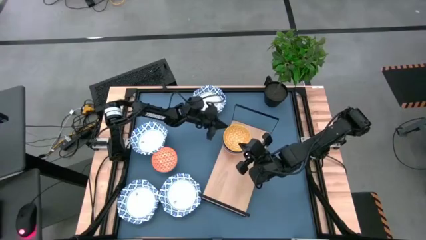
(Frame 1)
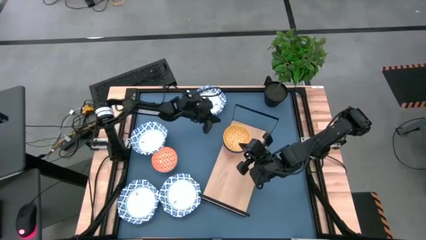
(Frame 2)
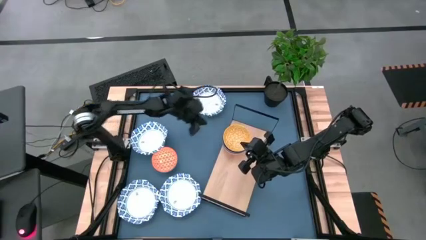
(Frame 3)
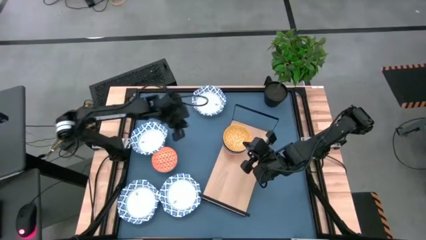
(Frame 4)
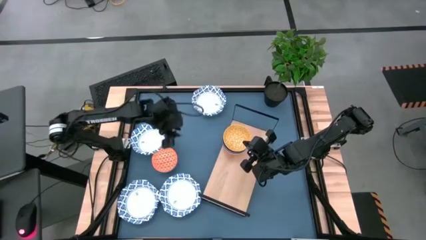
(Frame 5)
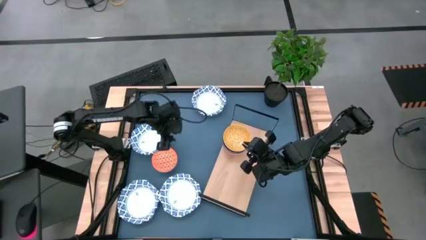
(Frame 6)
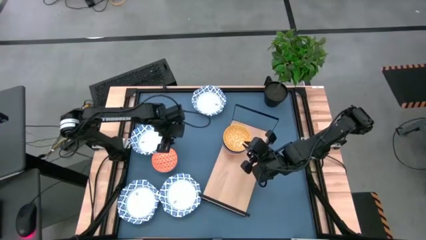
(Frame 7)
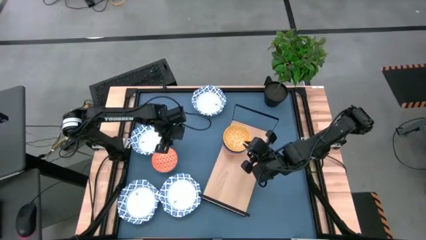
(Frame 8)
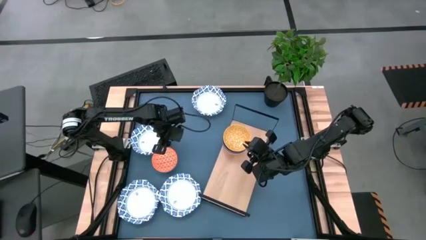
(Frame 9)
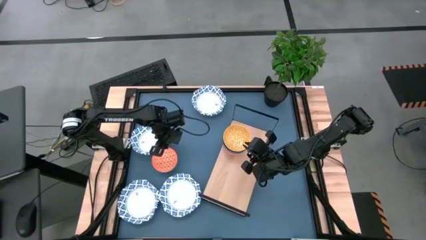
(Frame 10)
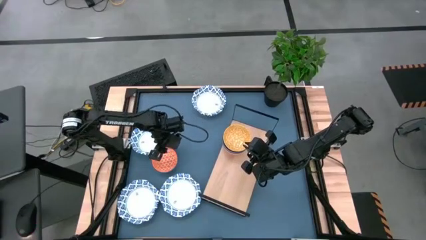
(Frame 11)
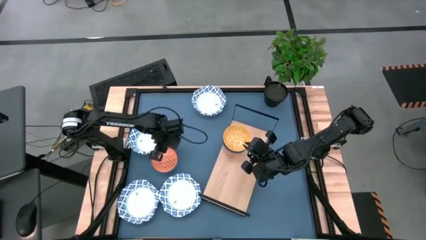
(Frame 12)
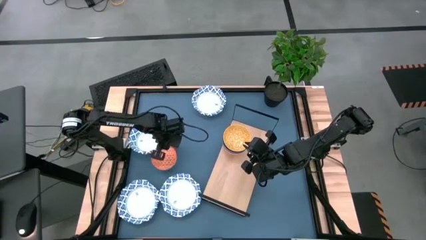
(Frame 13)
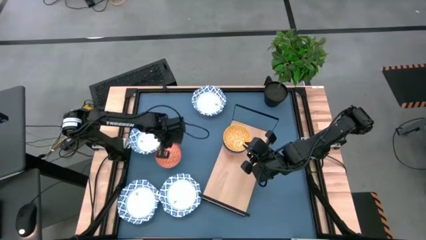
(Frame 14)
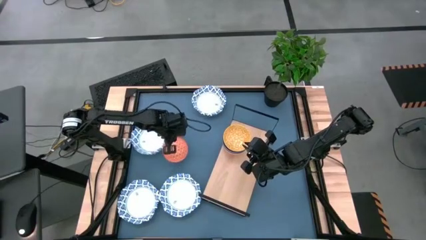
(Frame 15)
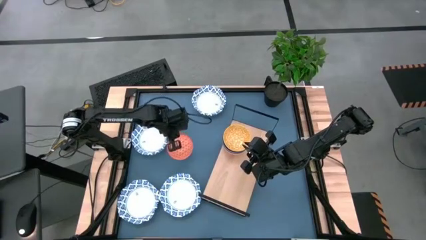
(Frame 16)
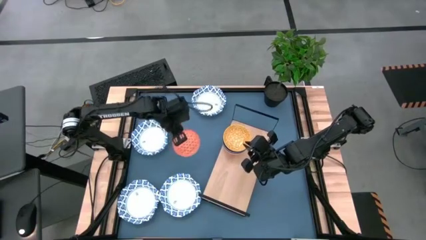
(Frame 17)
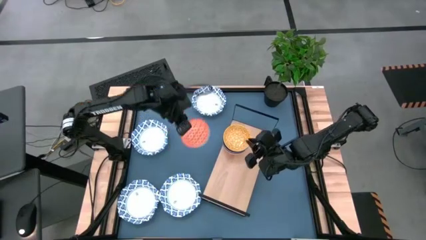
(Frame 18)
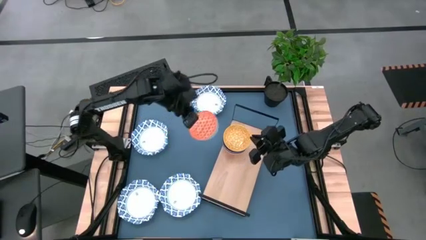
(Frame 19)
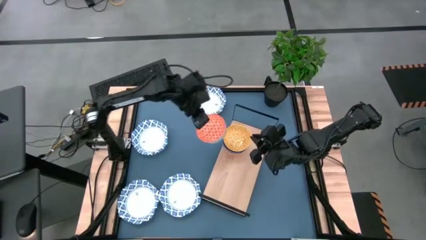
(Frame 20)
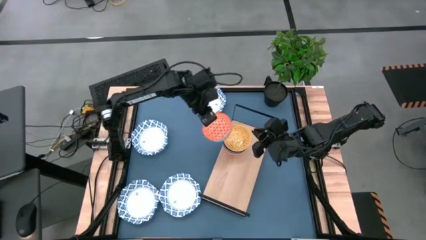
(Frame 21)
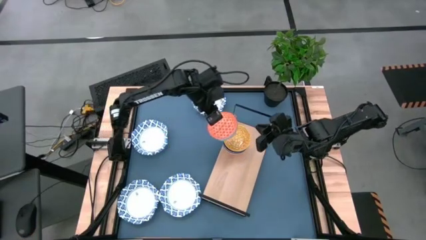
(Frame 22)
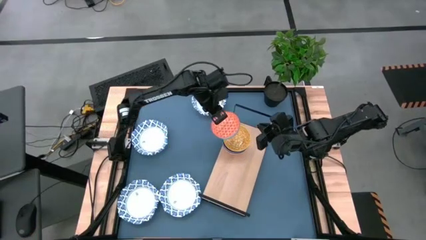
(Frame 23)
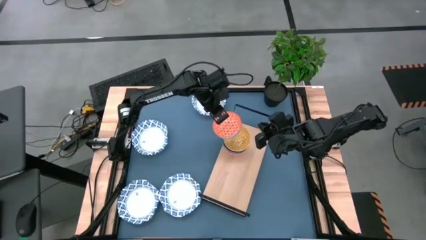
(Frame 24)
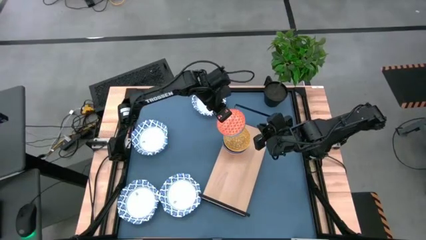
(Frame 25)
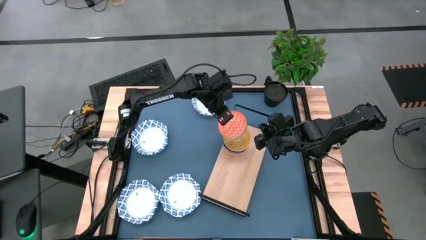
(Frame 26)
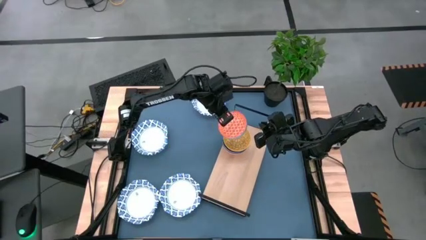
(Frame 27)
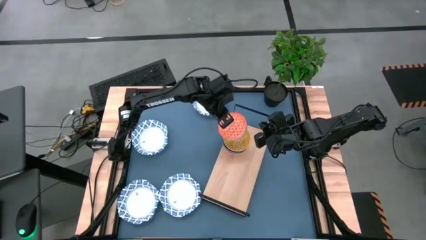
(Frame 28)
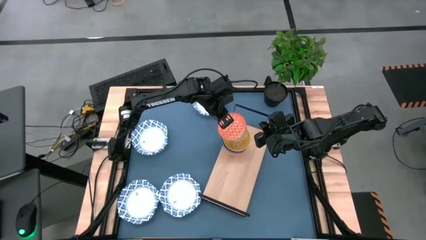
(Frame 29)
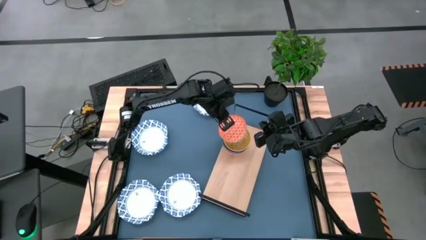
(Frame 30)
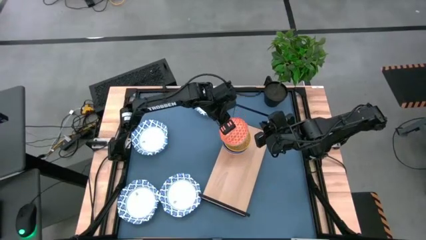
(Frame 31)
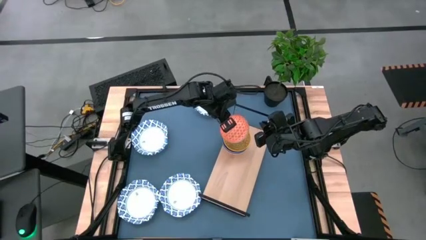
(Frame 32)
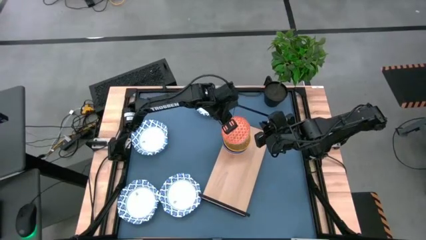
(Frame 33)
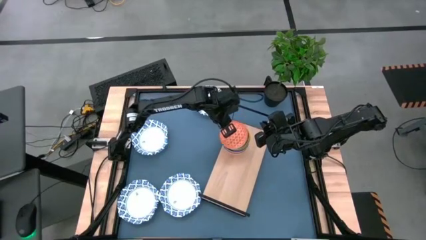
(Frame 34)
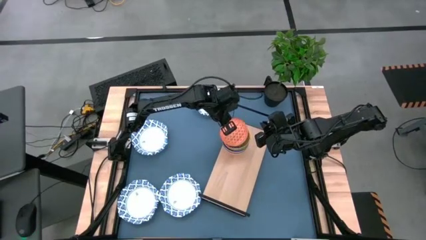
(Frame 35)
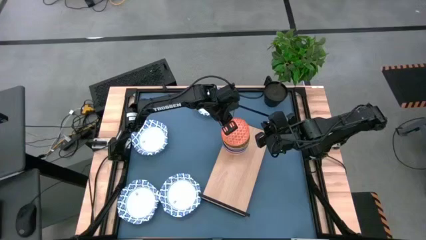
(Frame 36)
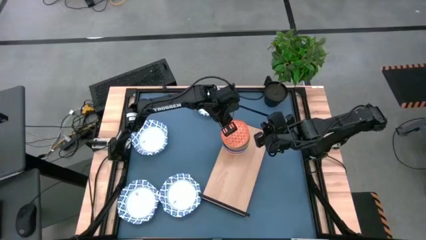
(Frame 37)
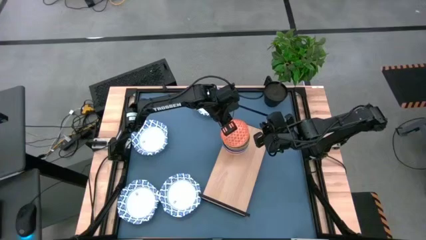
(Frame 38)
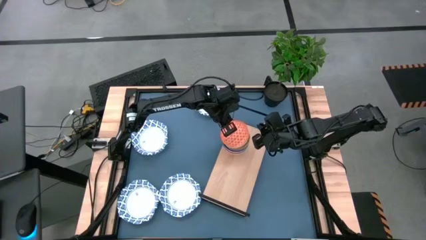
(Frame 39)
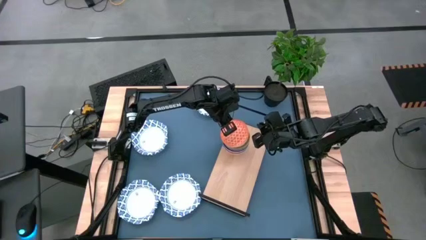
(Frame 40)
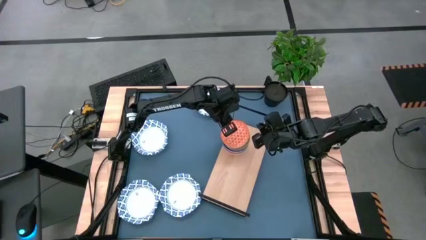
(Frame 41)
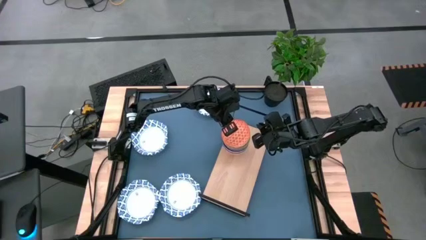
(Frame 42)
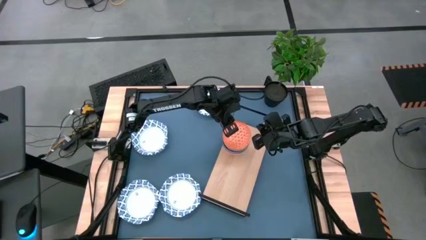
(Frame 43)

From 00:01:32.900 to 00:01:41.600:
Task: Place and stack bowls onto a shelf
Stack the orange patterned bowl into the yellow patterned bowl

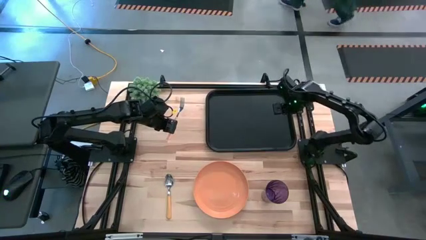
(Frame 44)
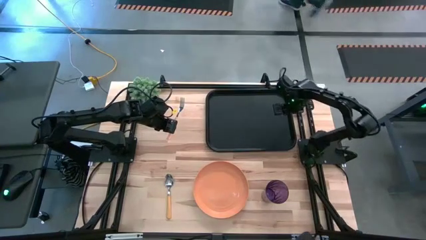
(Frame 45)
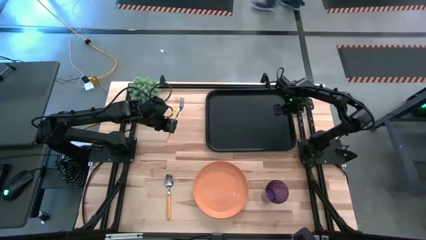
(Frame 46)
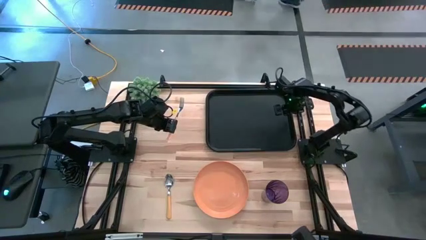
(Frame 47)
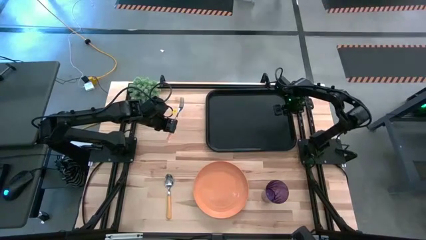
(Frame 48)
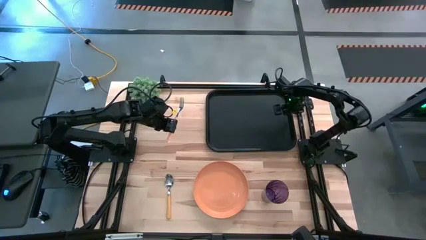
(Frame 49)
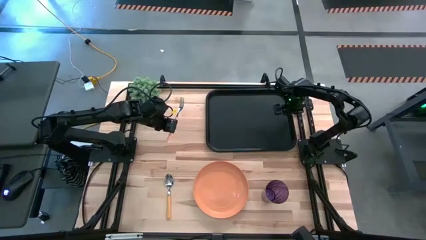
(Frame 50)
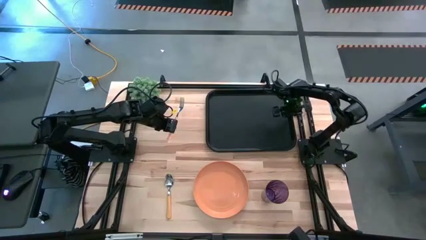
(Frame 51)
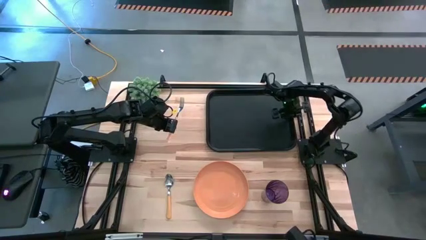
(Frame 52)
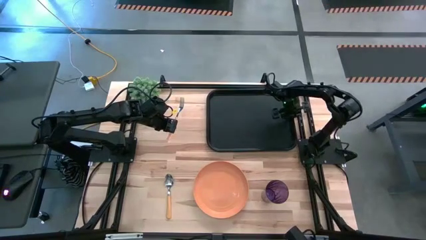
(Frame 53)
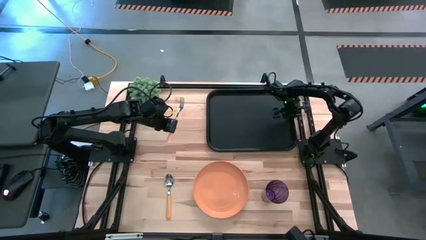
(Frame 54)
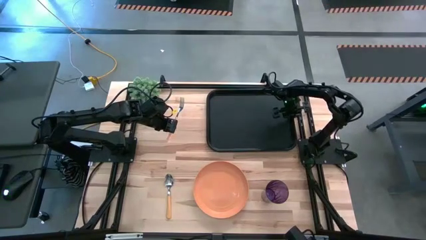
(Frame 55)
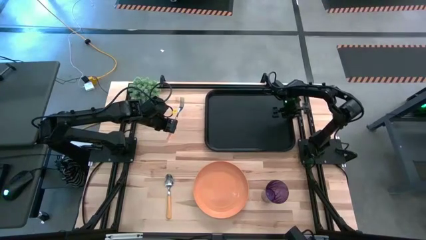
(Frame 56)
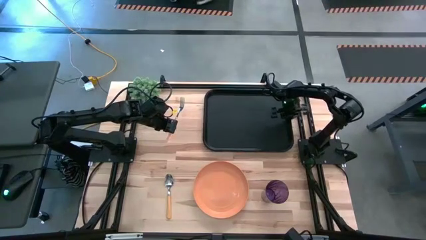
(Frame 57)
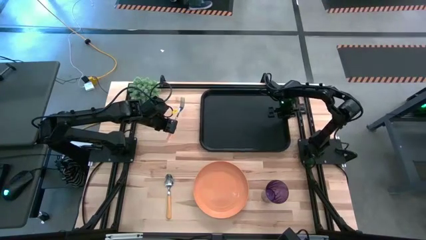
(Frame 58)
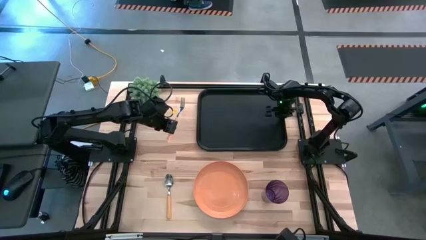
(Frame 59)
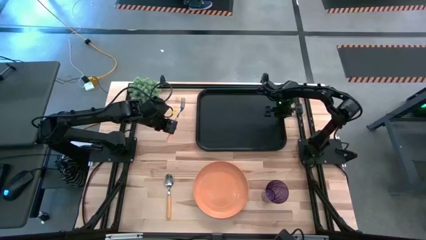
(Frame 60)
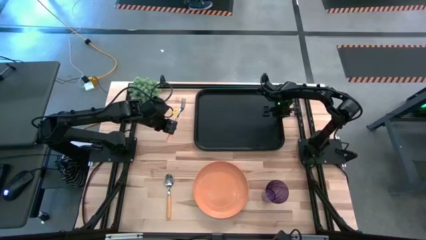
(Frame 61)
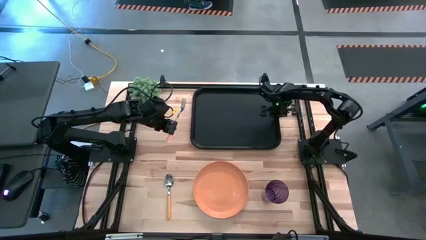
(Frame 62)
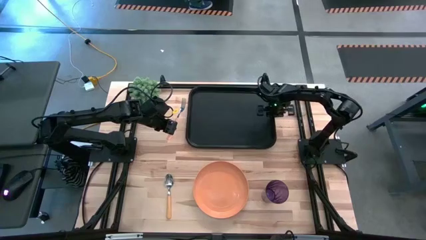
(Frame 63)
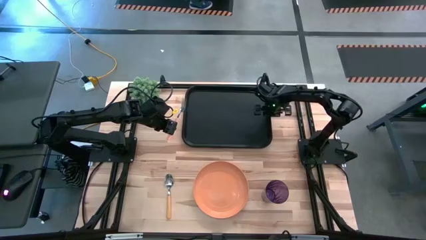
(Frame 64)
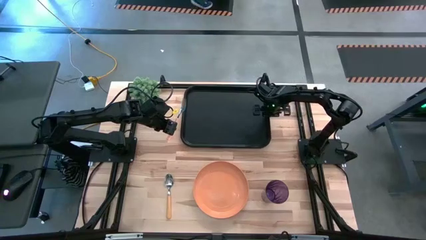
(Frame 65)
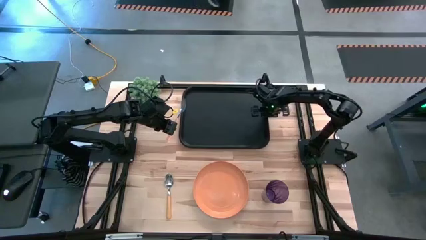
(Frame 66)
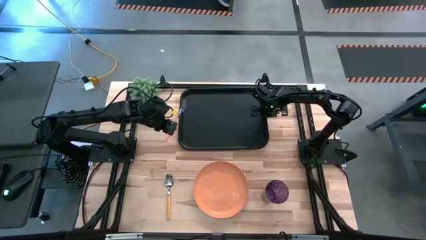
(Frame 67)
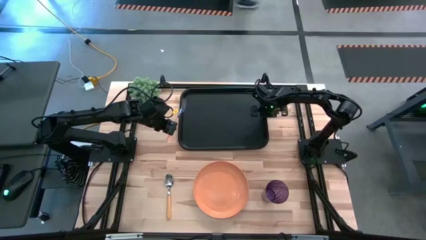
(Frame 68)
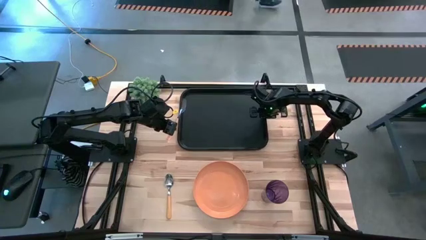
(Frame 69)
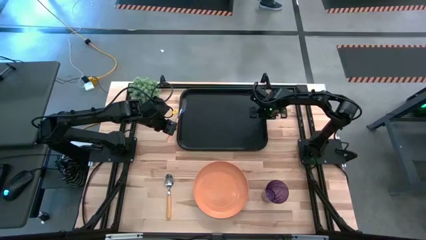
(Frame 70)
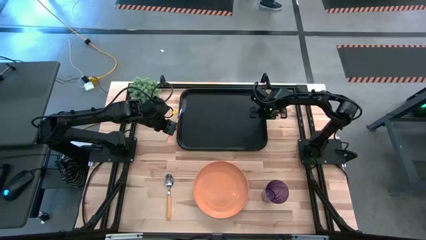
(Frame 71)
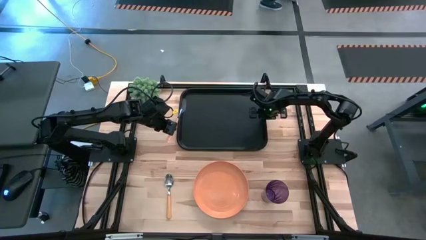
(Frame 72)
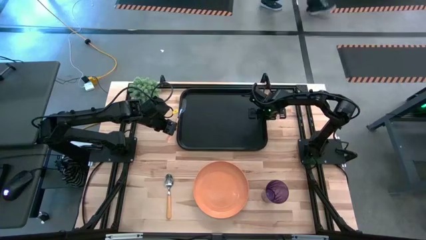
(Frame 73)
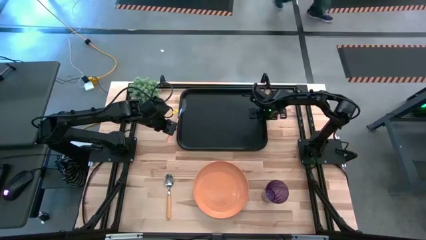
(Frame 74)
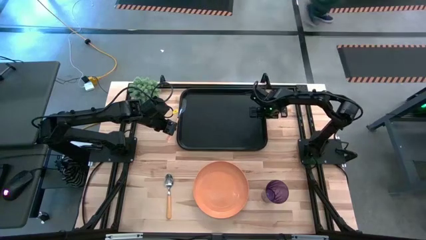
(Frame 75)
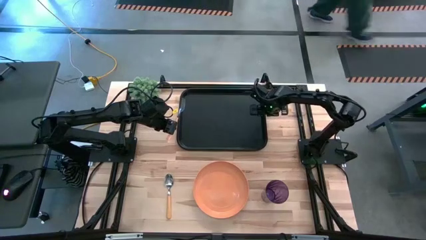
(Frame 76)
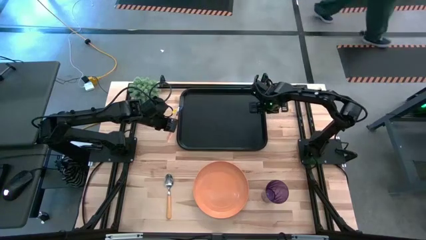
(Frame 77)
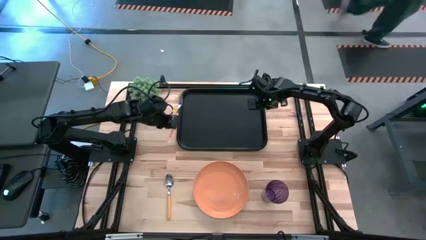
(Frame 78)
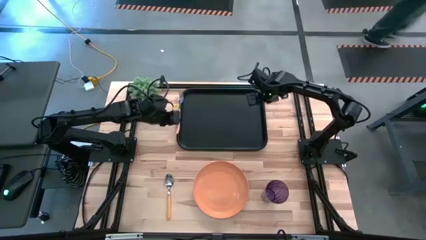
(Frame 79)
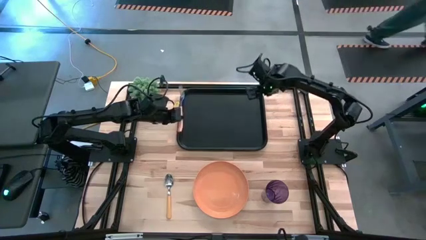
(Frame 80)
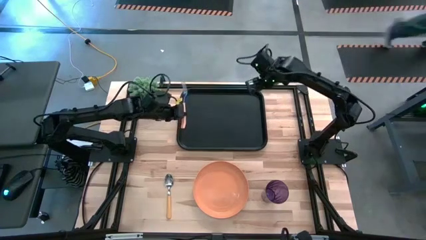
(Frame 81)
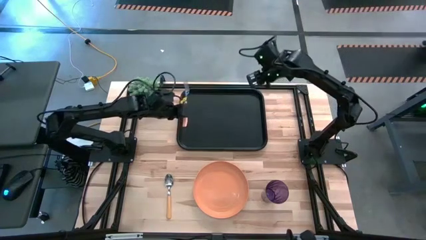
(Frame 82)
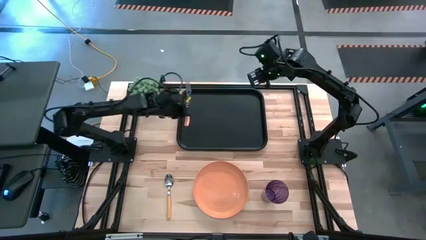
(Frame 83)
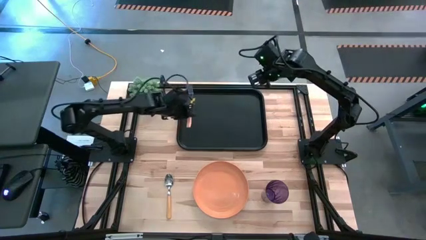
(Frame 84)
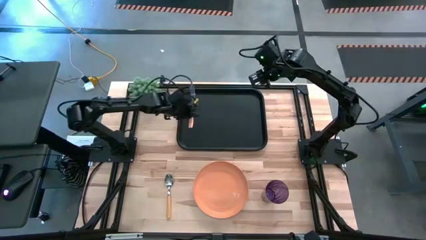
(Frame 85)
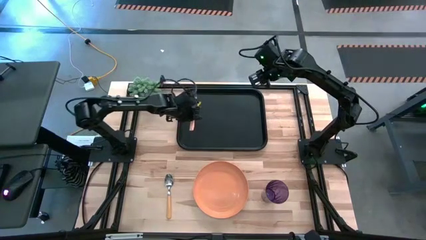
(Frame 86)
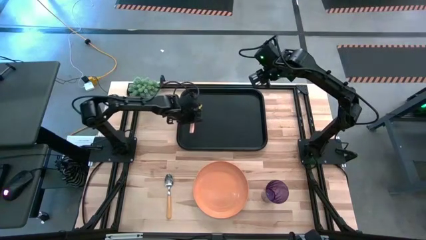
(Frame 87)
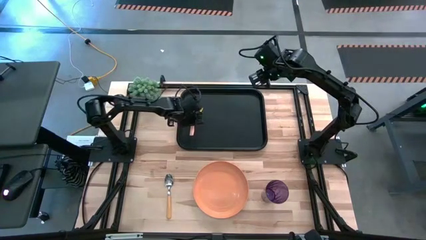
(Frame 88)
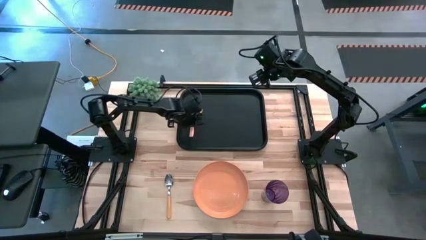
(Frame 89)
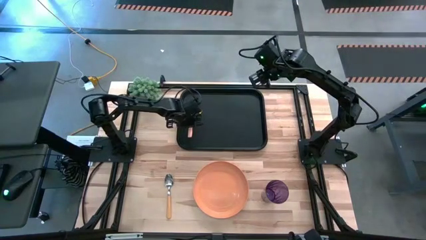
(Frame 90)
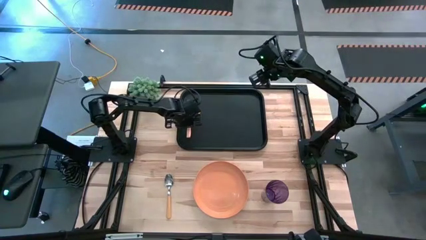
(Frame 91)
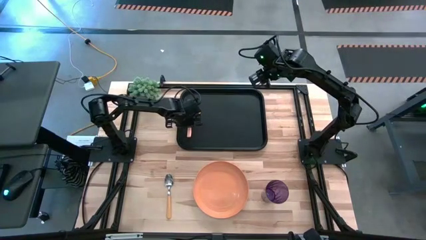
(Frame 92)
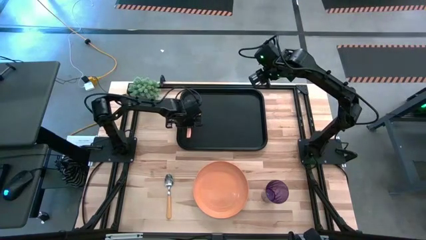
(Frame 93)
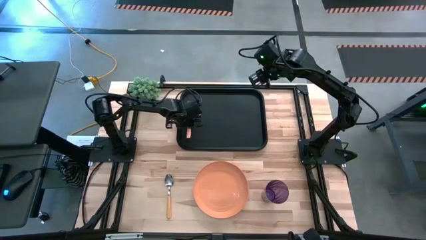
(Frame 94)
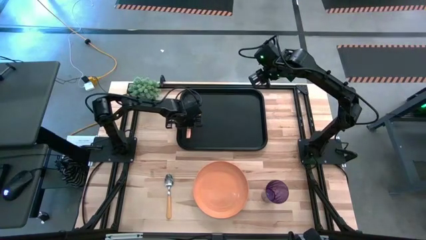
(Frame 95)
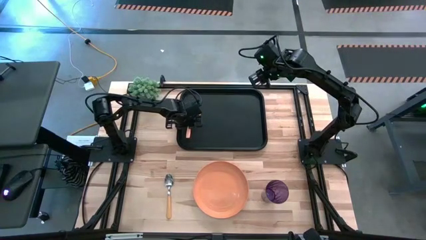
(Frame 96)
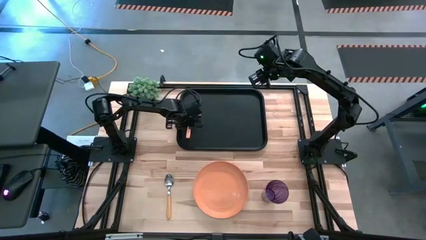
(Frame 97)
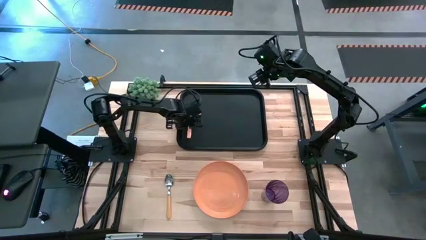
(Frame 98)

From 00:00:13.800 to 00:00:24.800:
Task: Pick and place plate/cup/fork/spoon on tray
Put the yellow fork on the black serving tray
